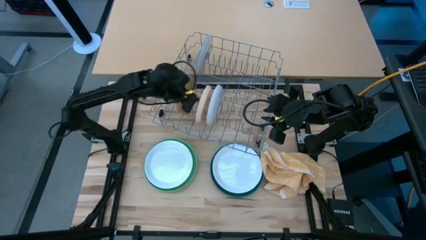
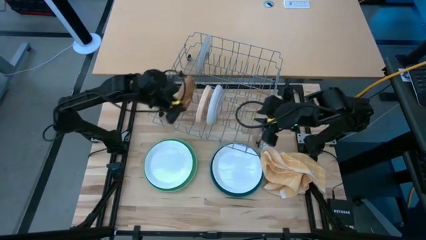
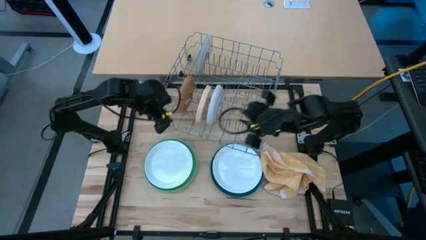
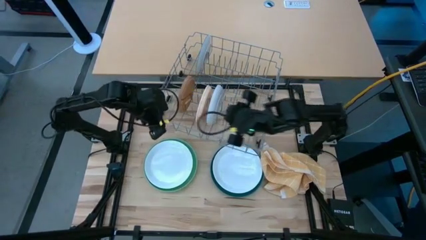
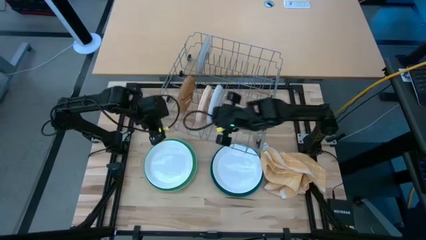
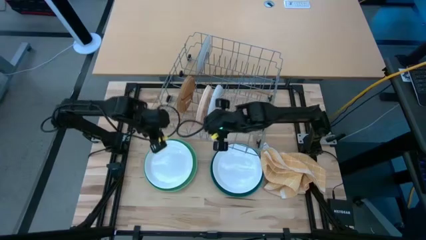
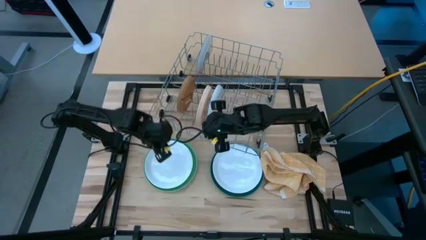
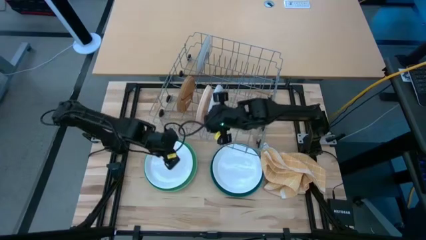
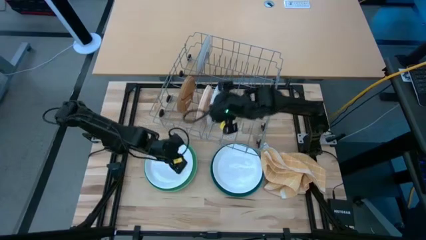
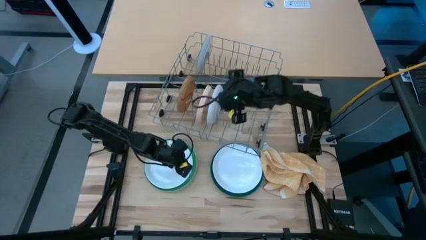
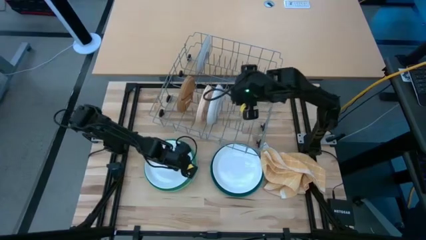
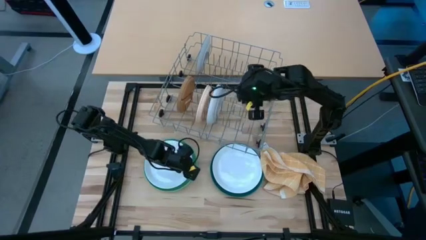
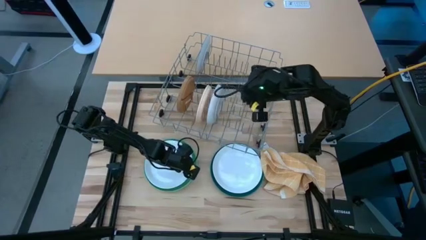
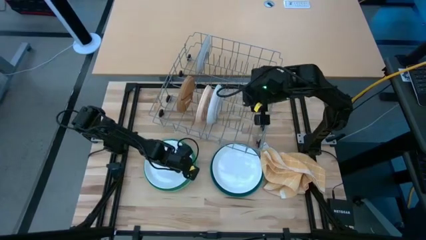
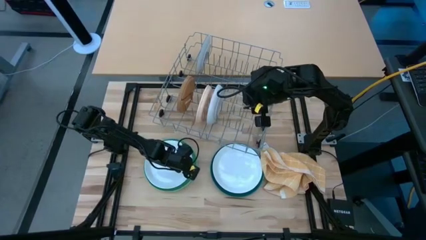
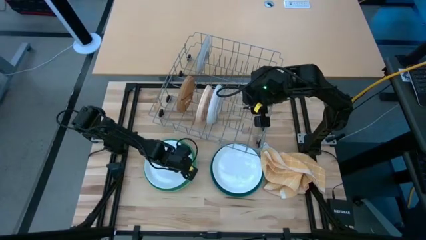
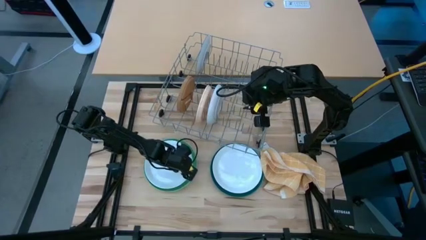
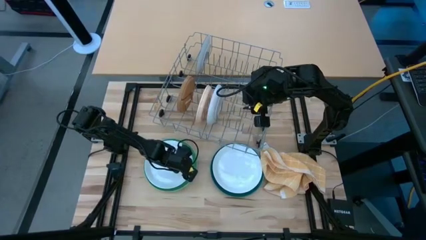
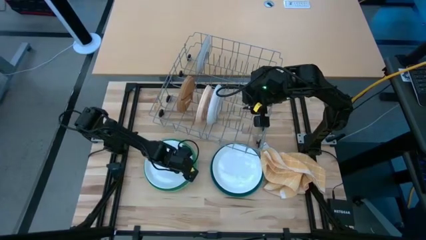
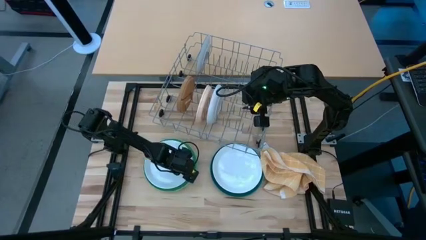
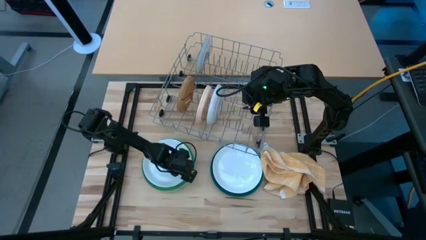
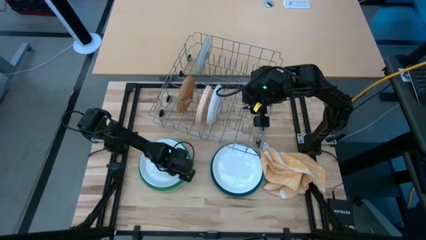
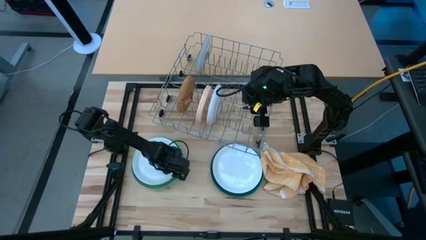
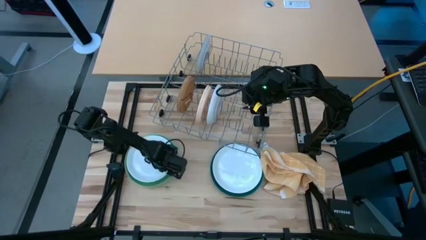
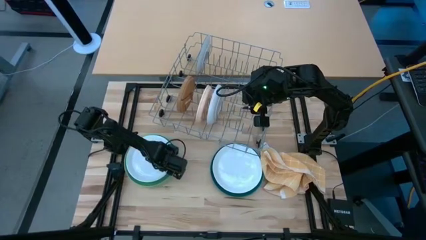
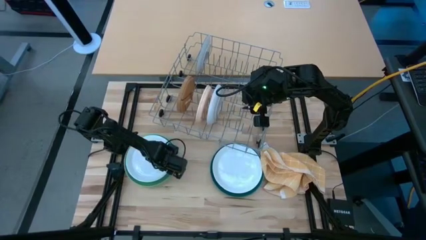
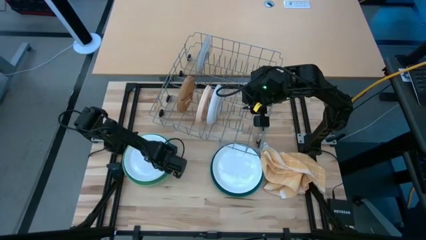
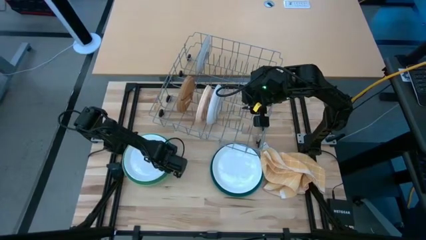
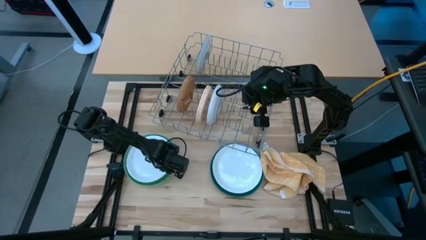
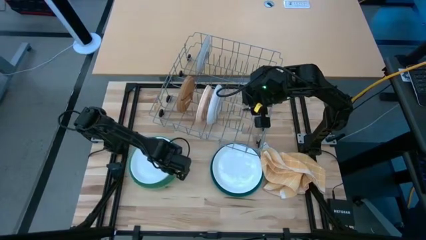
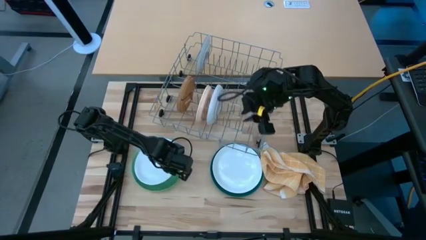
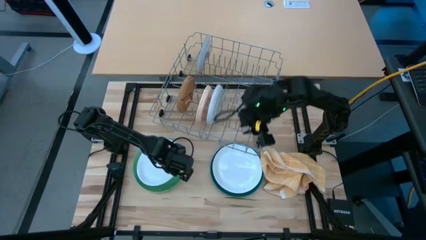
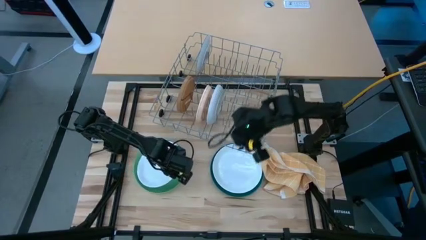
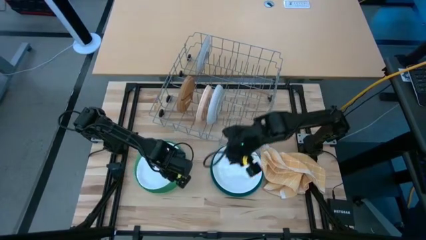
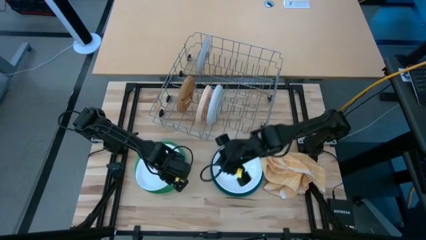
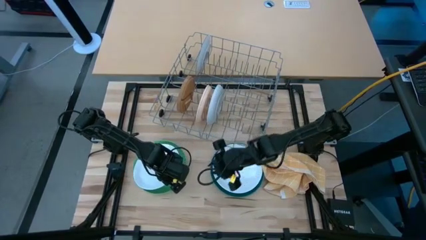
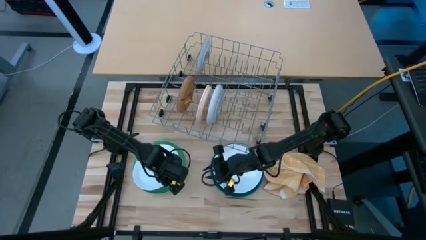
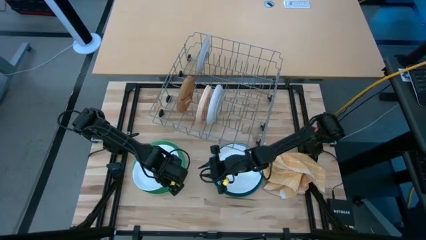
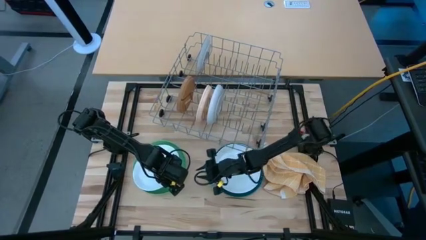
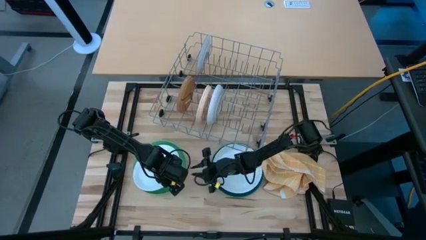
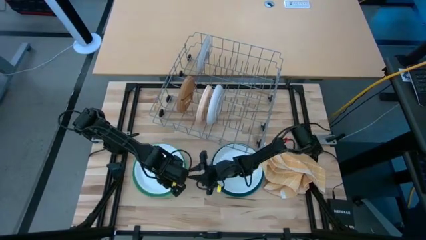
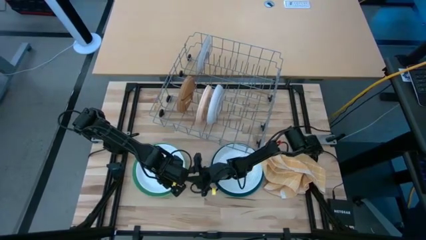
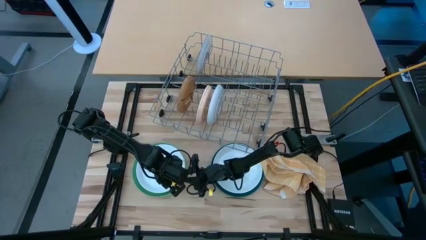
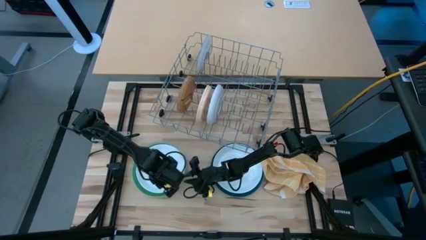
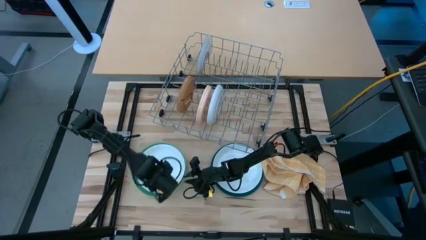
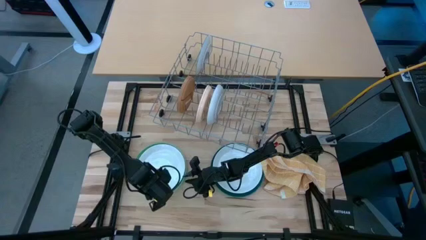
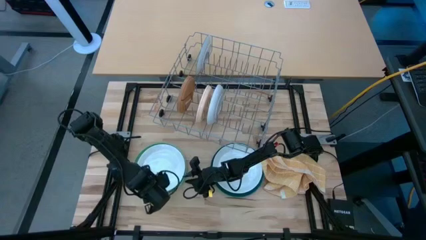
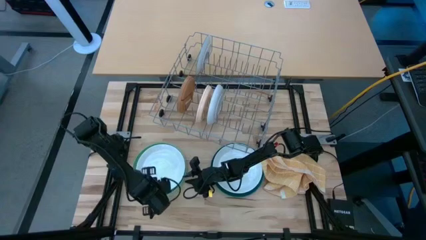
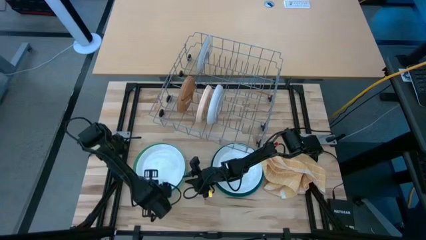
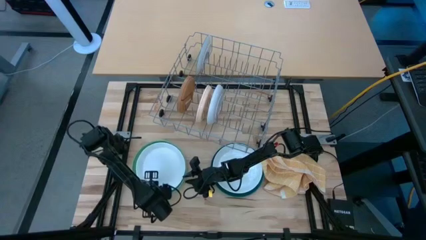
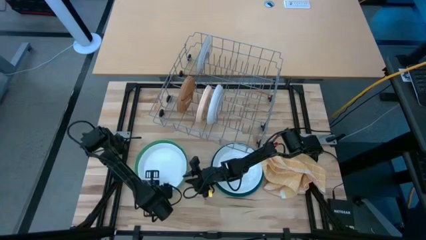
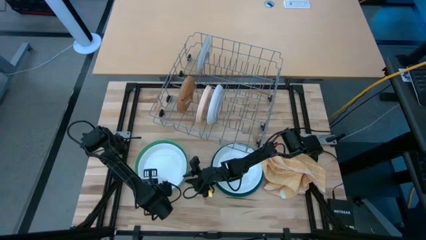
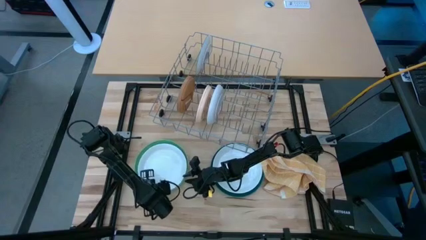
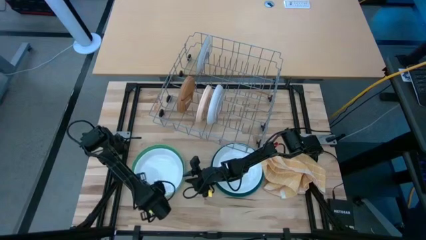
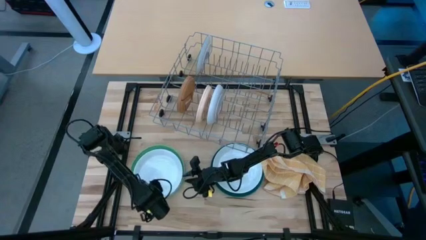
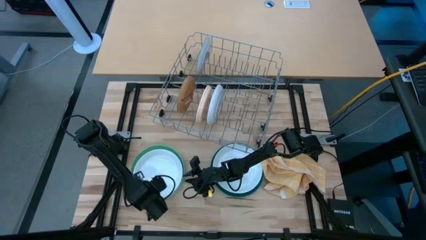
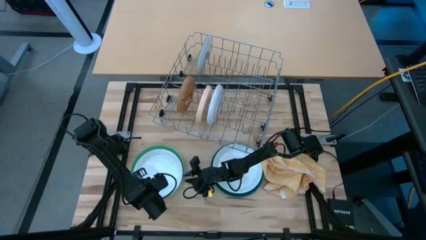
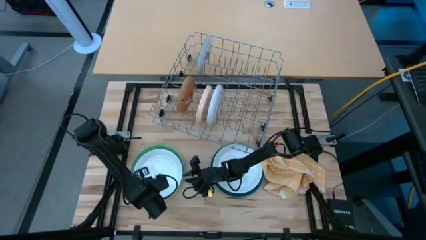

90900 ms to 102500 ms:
Task: Sort dishes
Put the left white plate in the dish rack
